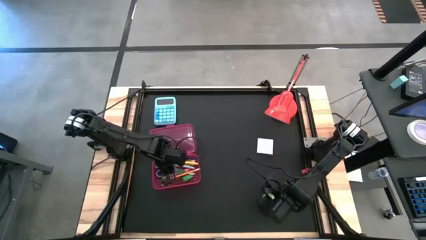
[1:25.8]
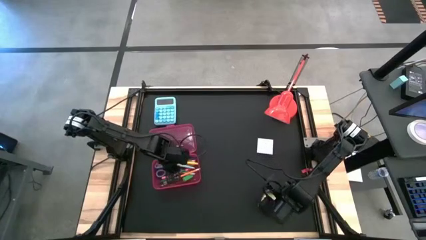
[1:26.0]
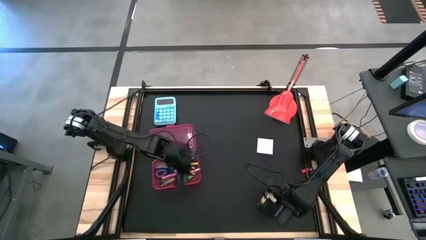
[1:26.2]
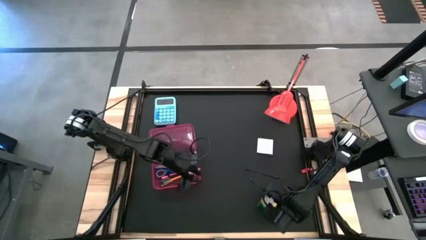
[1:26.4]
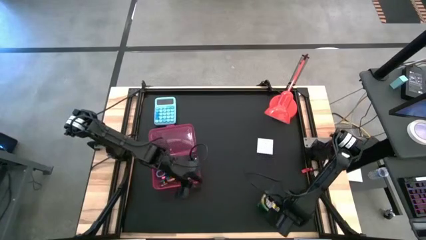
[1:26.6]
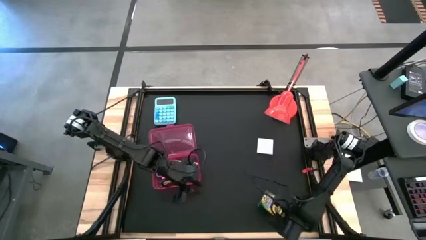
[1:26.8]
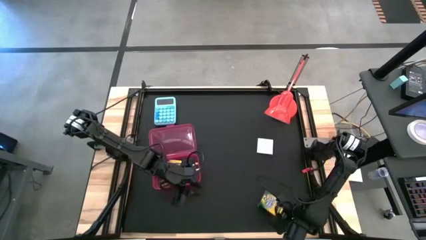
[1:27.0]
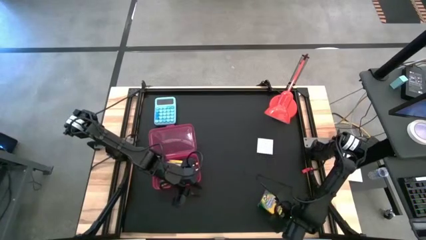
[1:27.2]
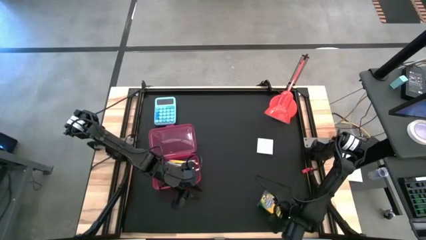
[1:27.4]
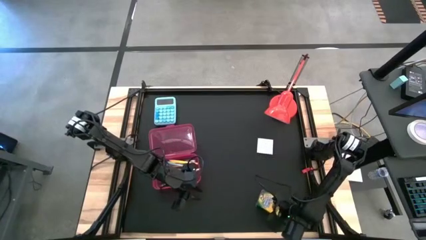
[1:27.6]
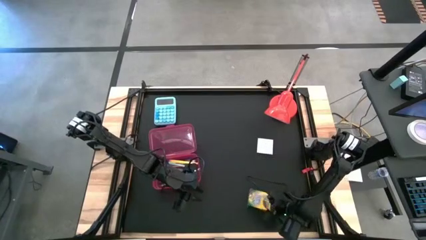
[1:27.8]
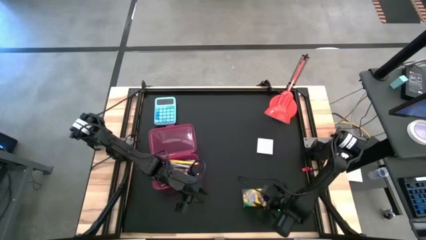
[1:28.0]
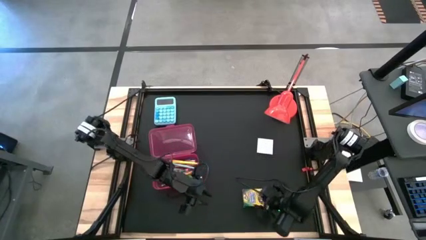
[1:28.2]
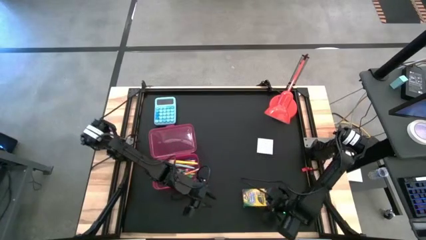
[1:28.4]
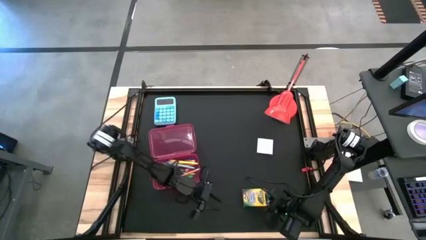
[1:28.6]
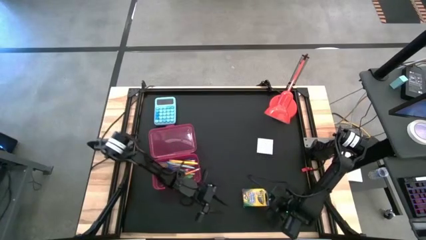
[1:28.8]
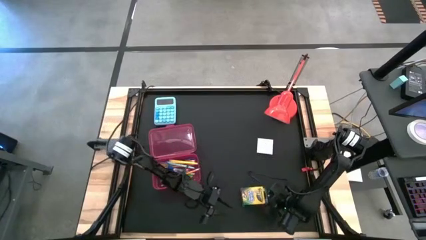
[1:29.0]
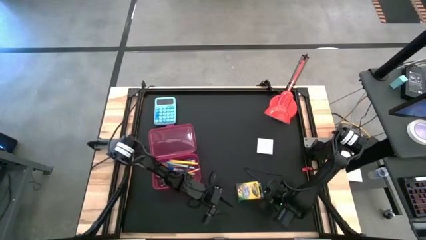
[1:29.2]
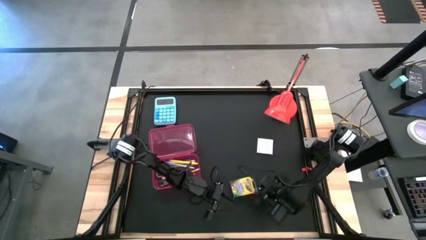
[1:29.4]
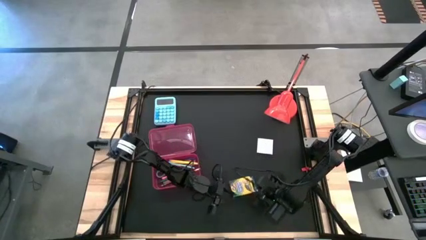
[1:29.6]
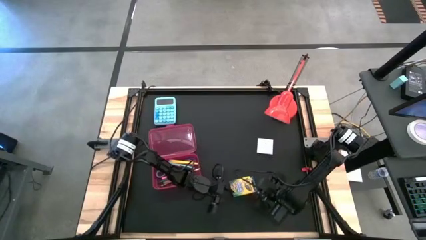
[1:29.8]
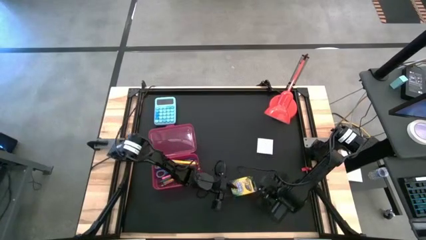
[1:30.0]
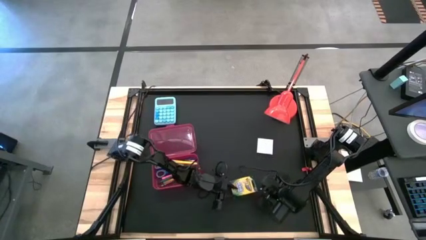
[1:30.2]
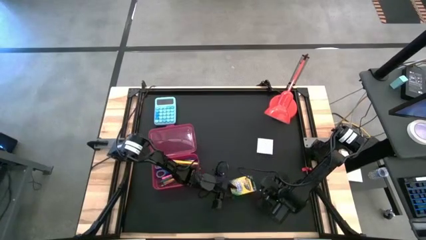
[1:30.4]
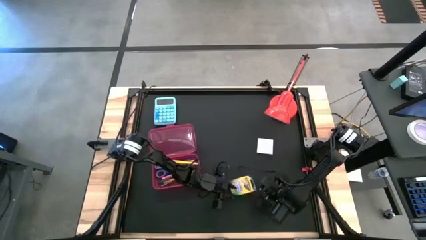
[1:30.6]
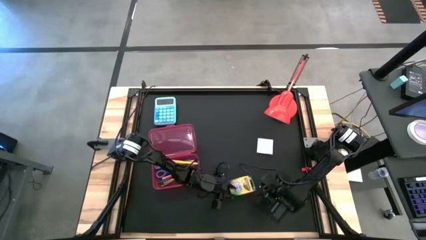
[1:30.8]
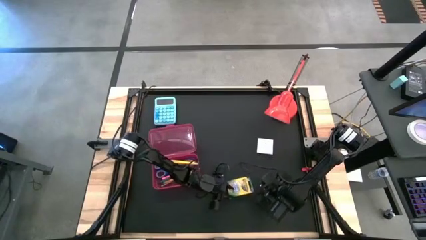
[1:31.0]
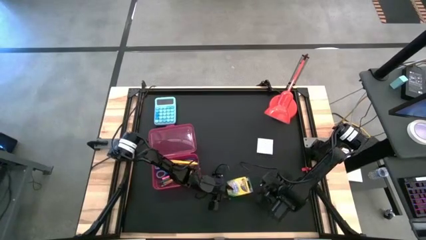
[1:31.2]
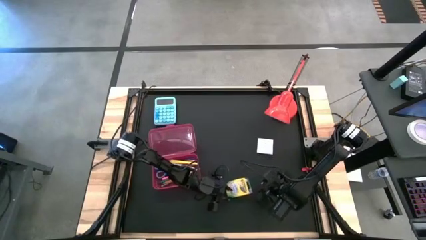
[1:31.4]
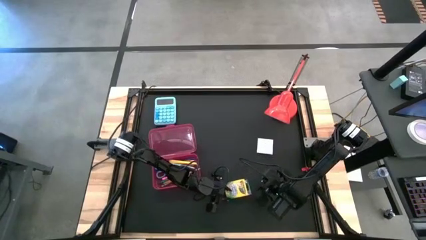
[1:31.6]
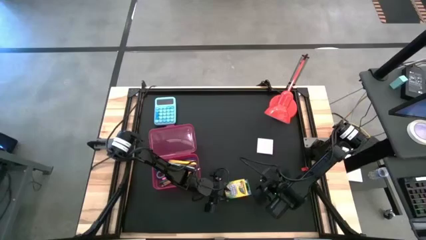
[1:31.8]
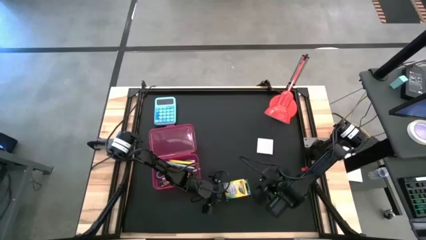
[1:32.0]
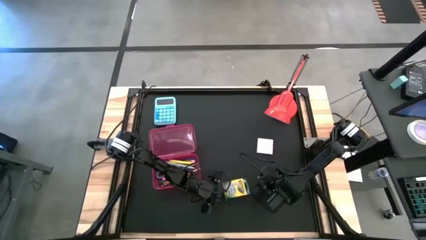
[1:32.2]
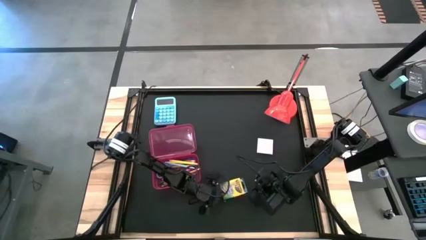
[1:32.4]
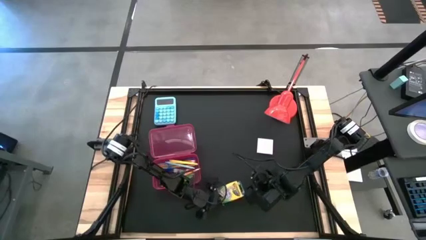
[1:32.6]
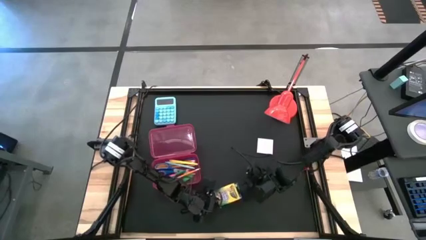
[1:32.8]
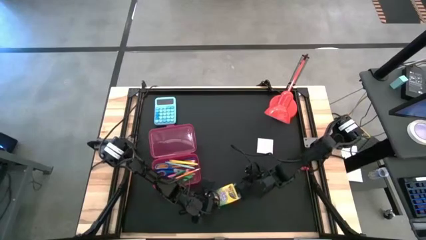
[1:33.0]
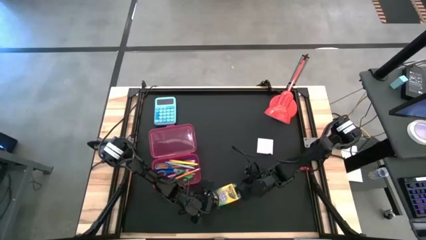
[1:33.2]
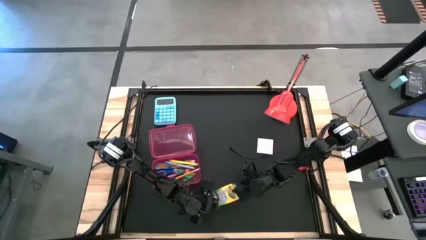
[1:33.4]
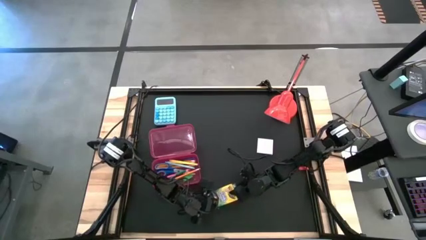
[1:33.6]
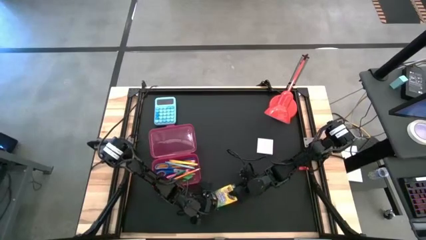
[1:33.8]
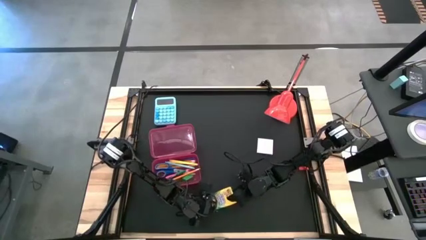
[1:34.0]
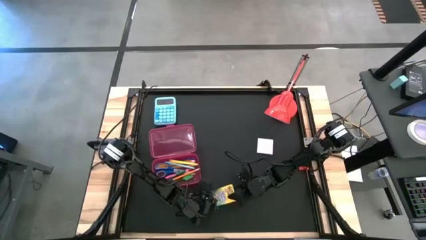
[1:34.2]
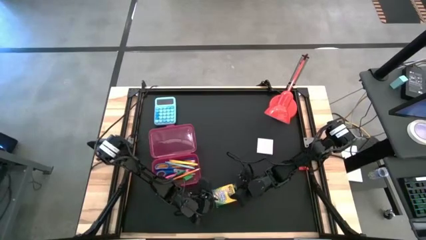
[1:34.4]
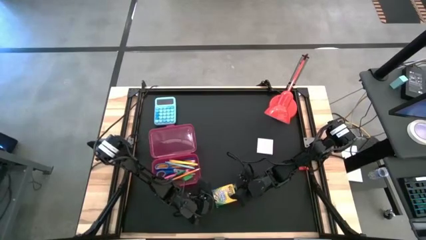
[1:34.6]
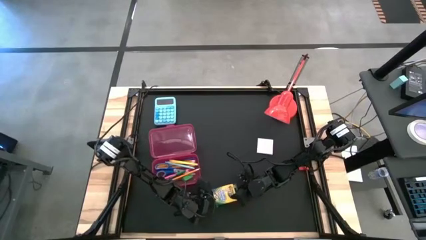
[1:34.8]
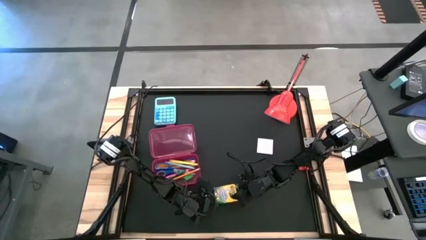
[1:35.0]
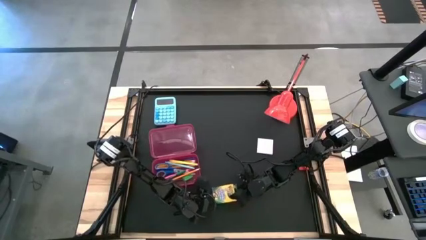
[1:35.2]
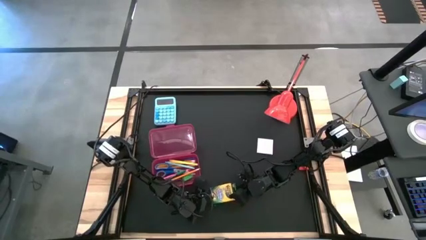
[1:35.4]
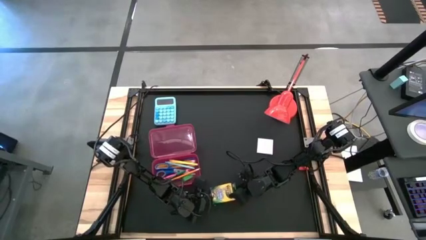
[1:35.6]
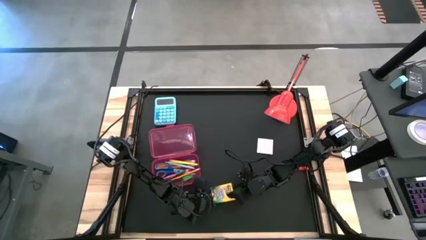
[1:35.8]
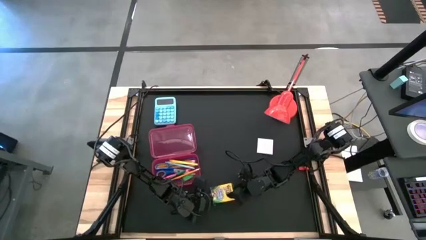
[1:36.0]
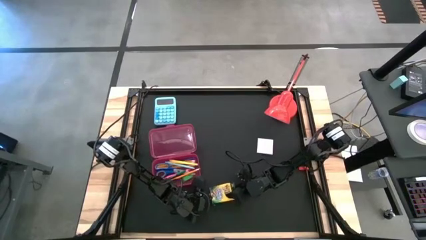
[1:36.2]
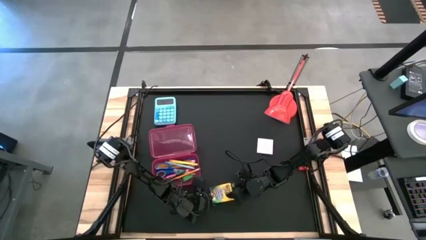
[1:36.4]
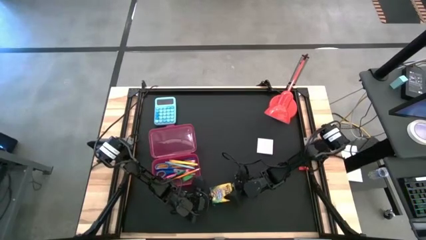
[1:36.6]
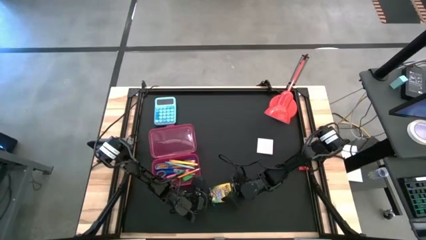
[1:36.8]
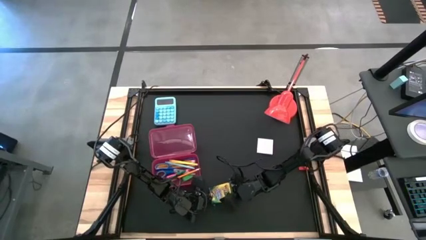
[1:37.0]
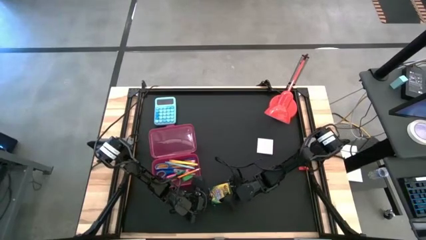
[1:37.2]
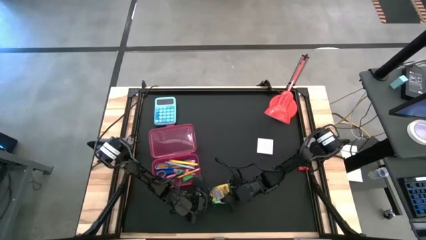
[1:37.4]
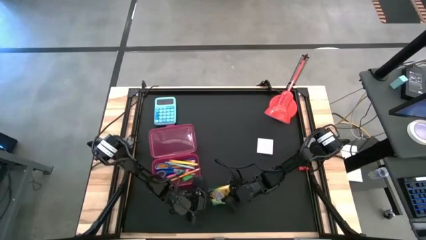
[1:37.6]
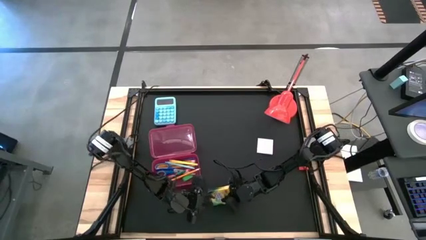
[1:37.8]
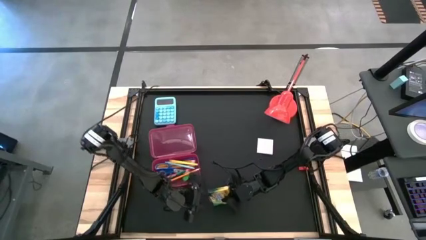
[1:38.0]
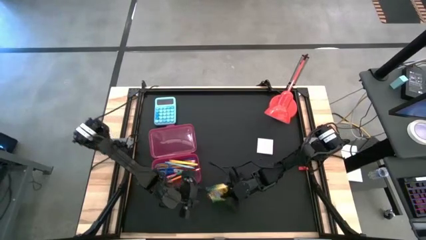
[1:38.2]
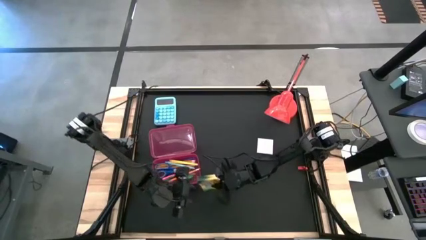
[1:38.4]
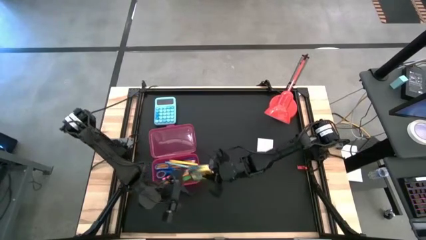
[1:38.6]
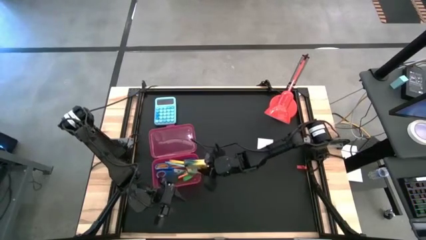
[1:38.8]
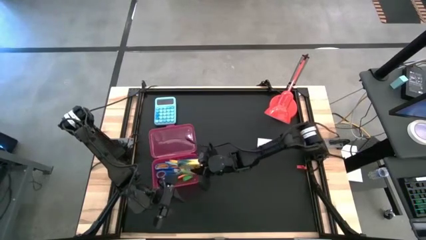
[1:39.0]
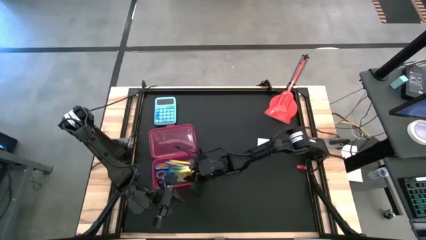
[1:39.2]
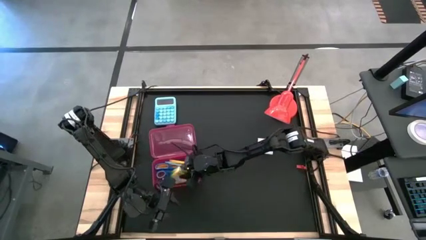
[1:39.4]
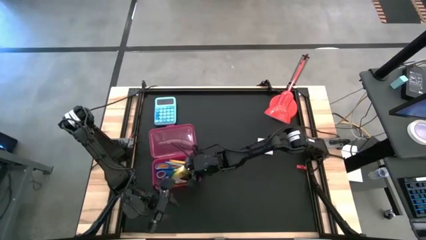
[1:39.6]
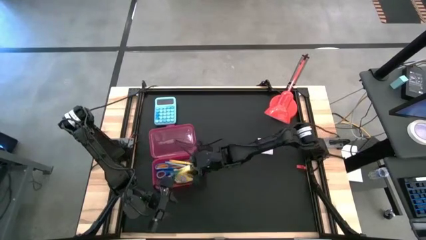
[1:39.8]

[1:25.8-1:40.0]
Task: Pack school essentials
Put the yellow crayon box into the pink supply box

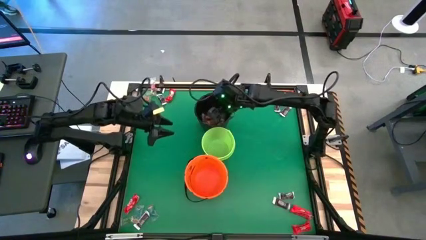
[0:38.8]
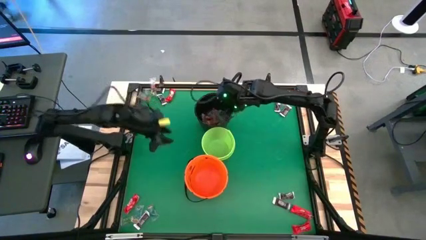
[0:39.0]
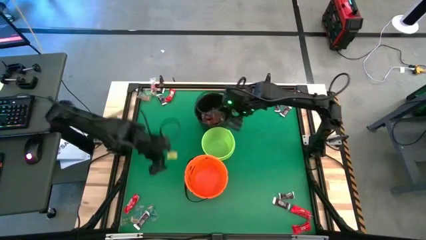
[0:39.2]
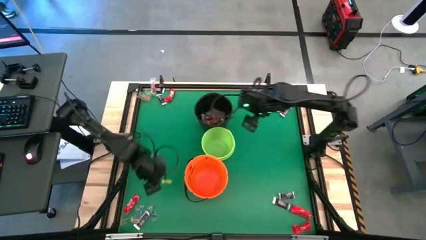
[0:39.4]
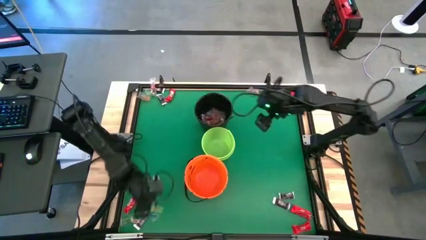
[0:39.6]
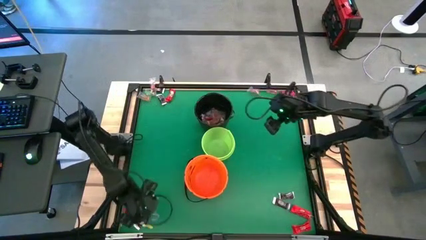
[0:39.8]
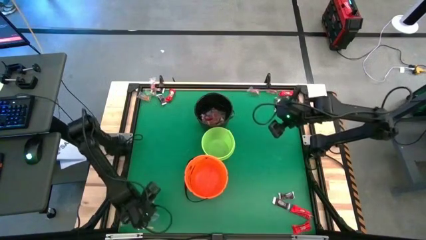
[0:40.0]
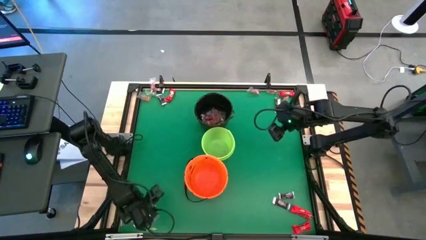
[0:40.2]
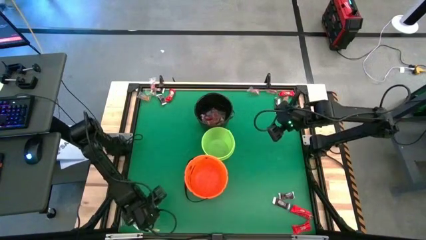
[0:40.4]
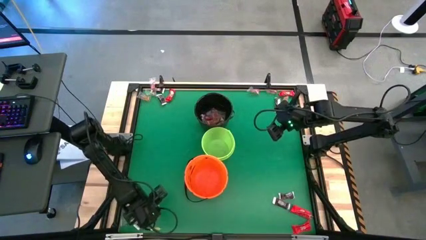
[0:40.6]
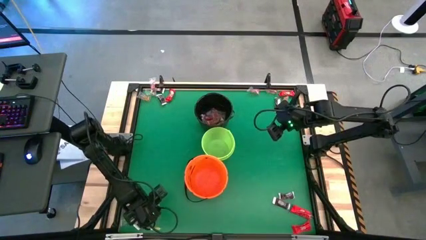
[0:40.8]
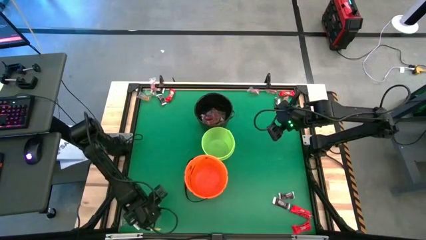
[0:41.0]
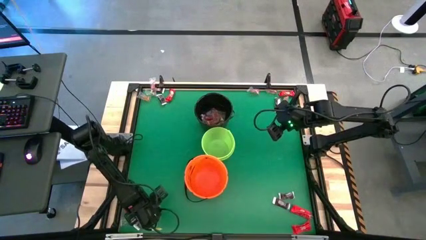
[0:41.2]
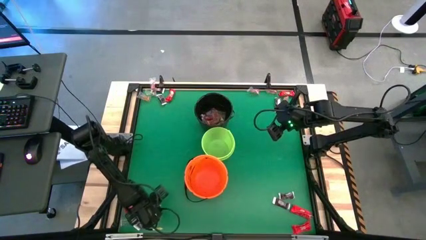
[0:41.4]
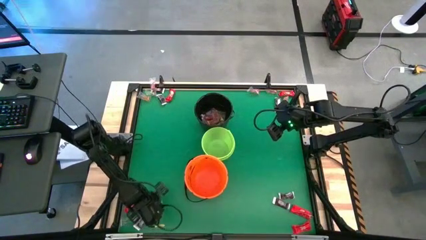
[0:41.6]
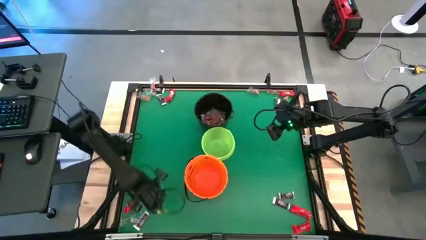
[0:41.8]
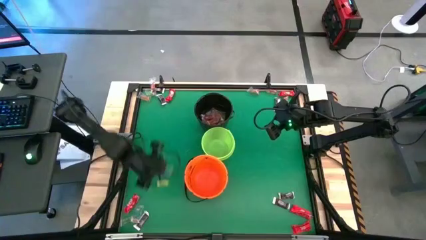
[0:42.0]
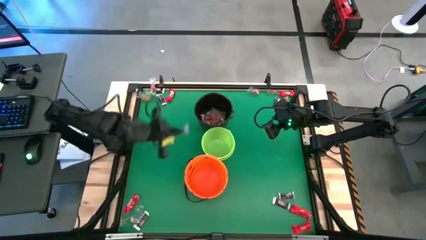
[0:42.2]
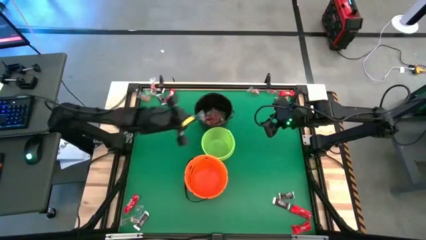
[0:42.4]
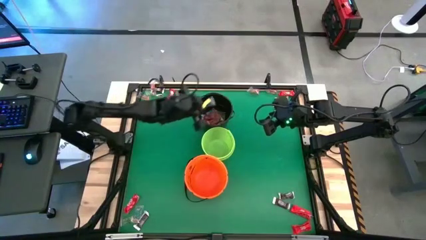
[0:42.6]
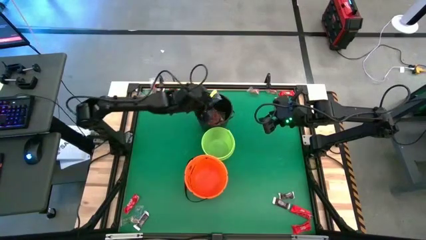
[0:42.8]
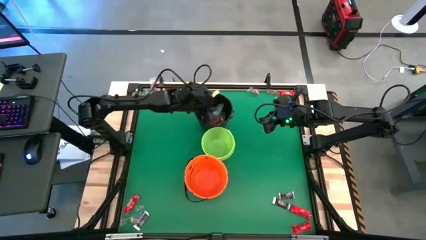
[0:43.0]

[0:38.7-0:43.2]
Task: Sort candy by brand, put in halloween buckets
Put the blue gummy into the black bucket
